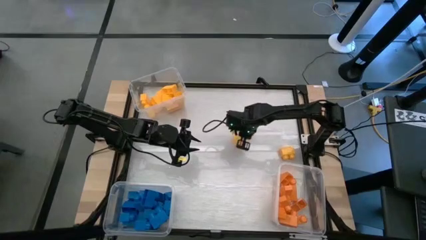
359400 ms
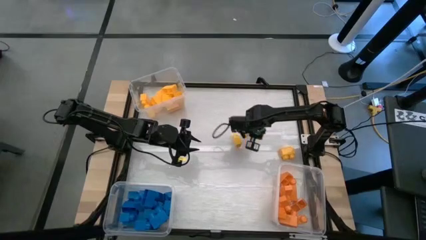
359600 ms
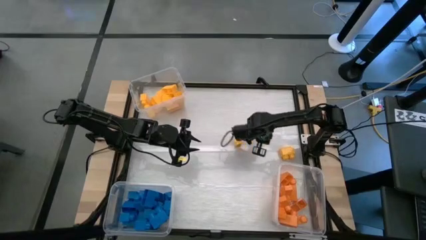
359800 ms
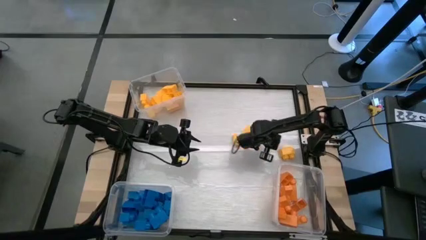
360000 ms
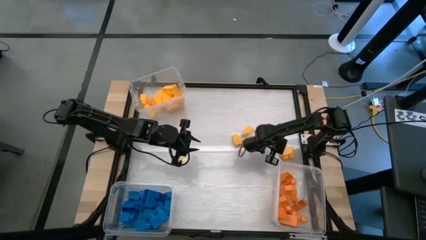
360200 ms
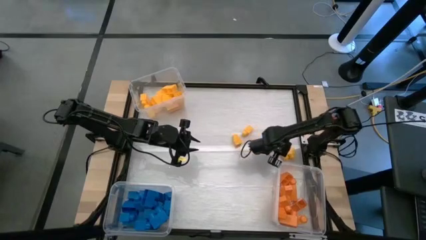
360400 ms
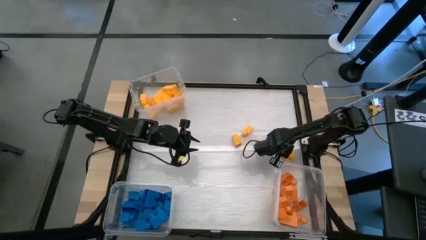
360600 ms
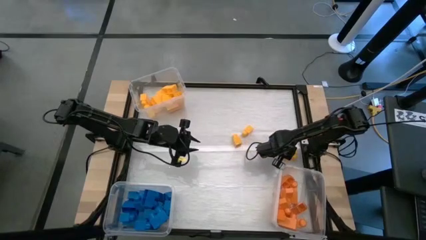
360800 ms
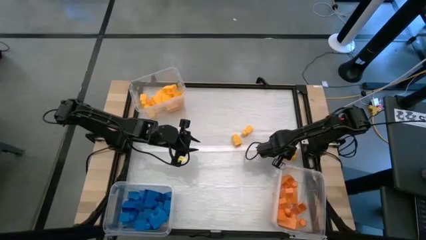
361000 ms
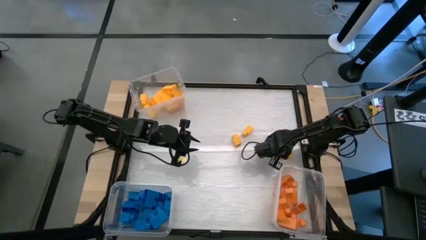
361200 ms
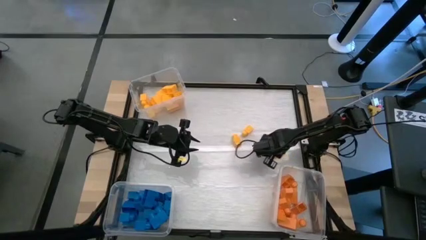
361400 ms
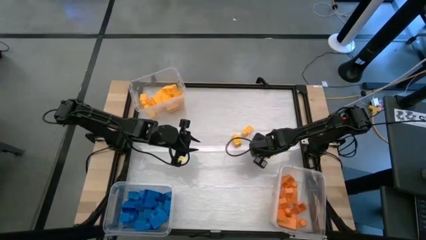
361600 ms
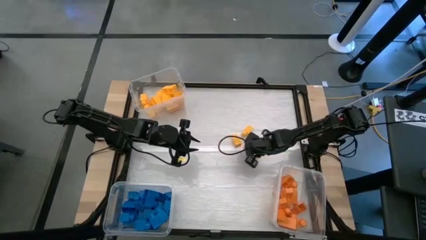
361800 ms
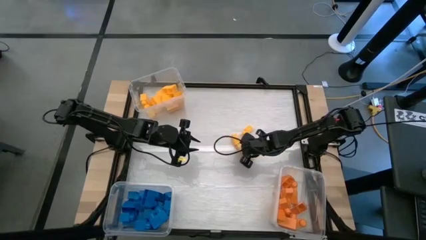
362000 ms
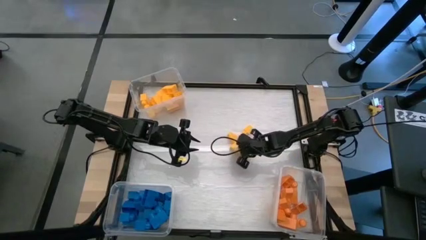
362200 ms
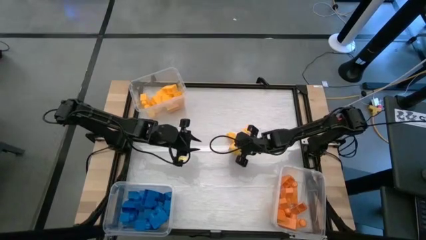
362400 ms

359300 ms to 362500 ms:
Task: Sort blocks
Move the yellow game piece to the left

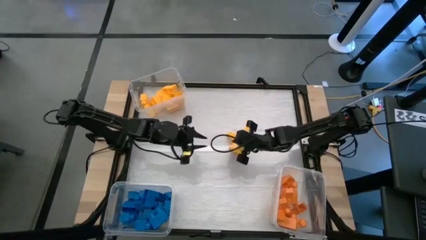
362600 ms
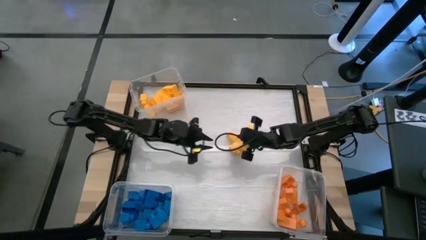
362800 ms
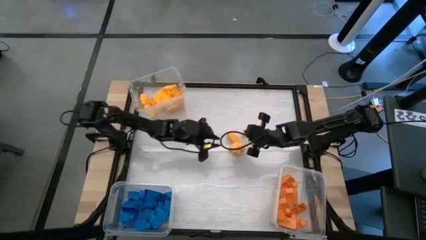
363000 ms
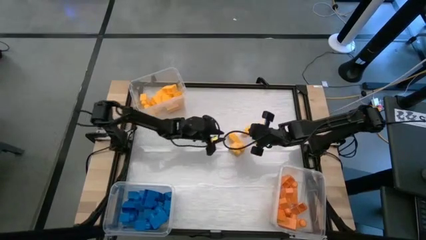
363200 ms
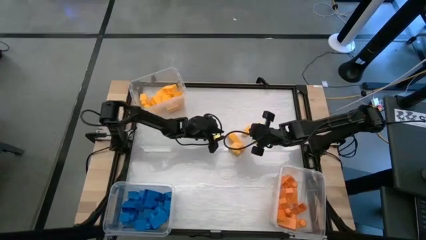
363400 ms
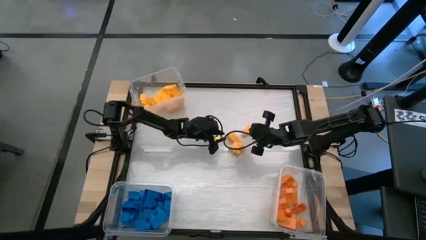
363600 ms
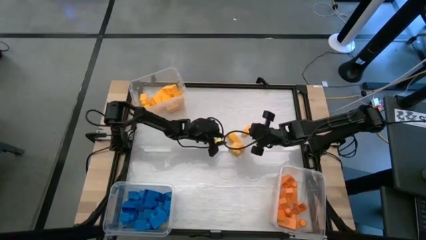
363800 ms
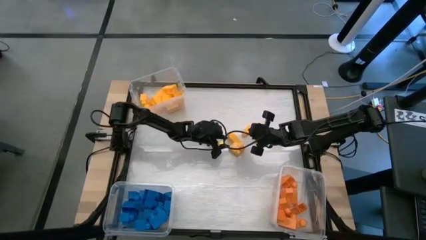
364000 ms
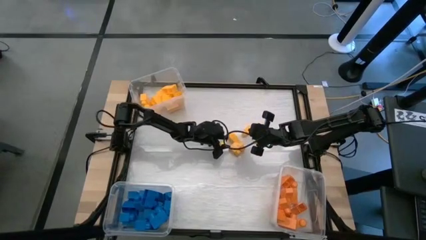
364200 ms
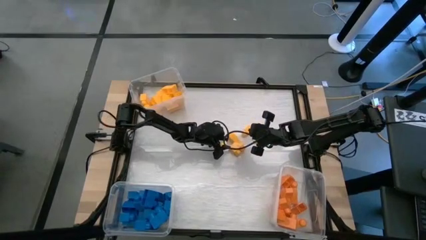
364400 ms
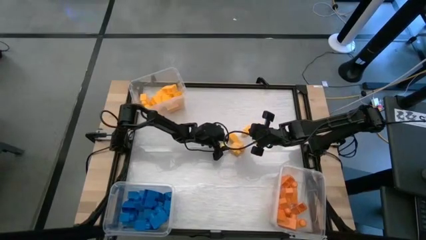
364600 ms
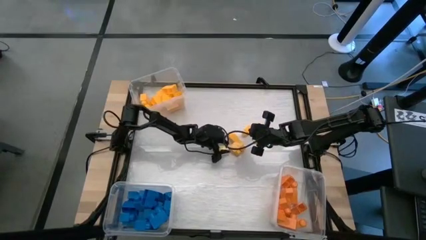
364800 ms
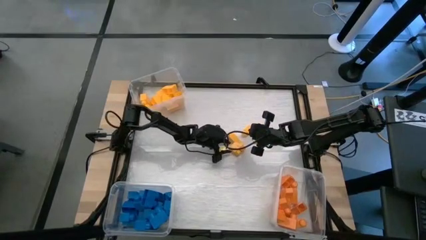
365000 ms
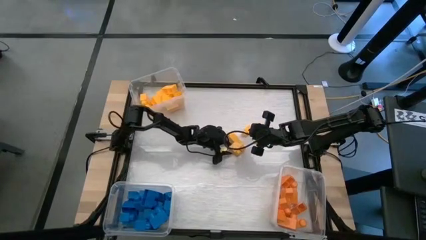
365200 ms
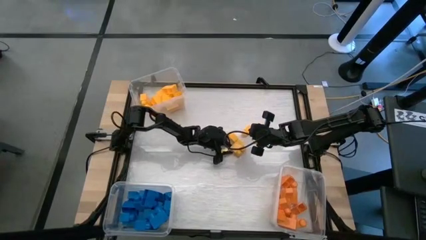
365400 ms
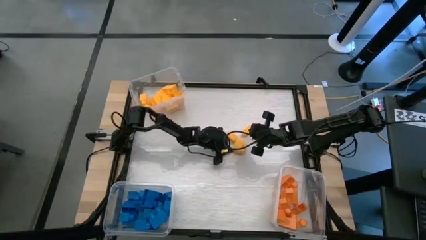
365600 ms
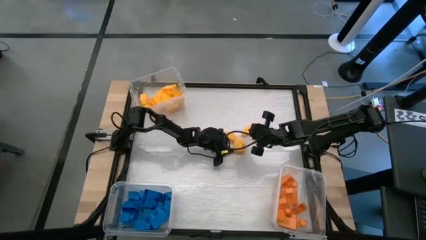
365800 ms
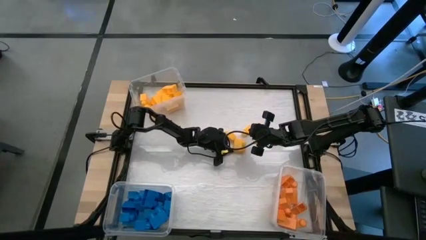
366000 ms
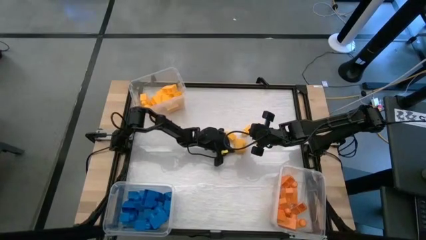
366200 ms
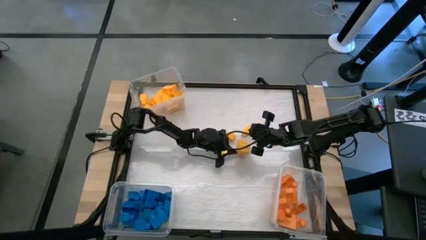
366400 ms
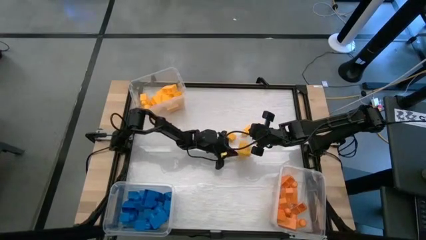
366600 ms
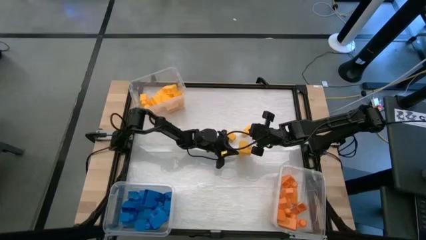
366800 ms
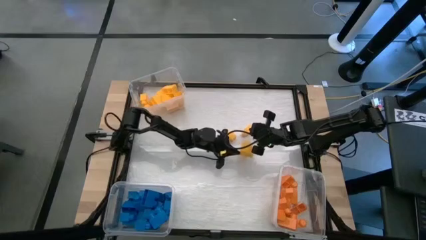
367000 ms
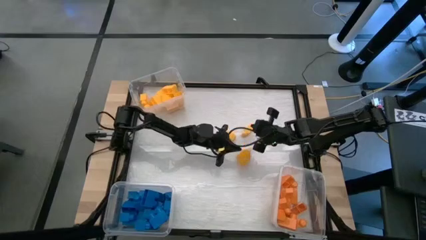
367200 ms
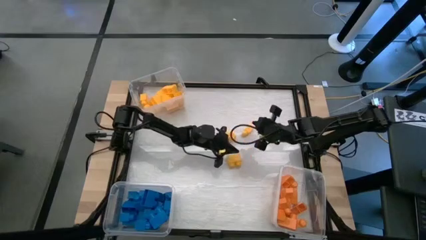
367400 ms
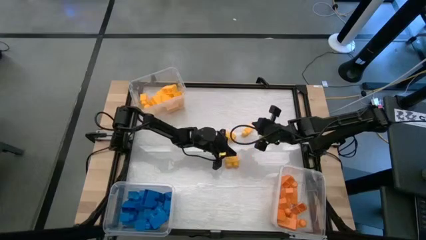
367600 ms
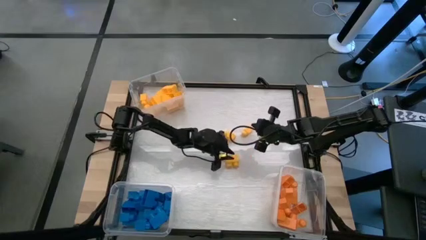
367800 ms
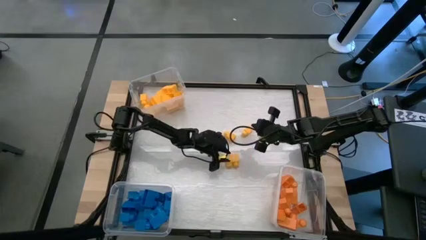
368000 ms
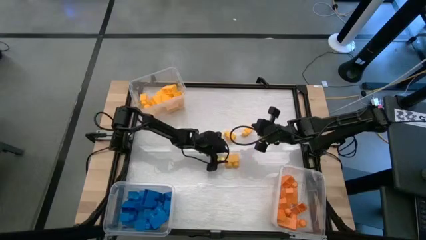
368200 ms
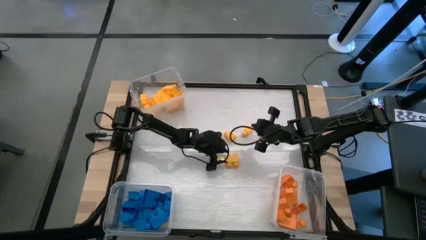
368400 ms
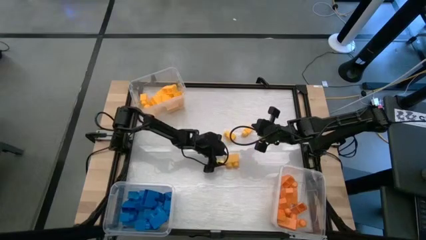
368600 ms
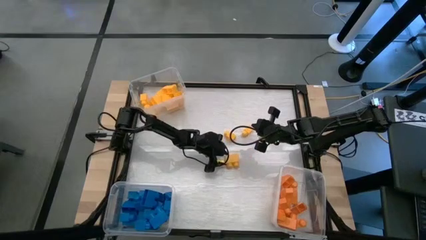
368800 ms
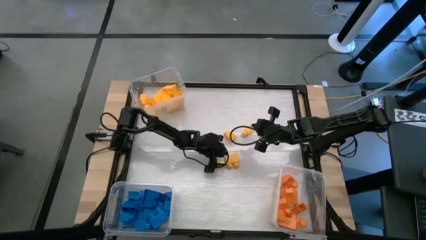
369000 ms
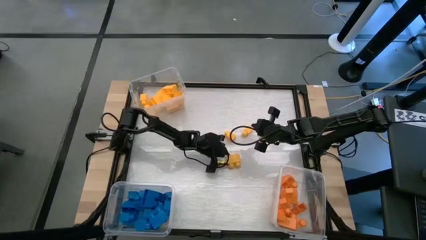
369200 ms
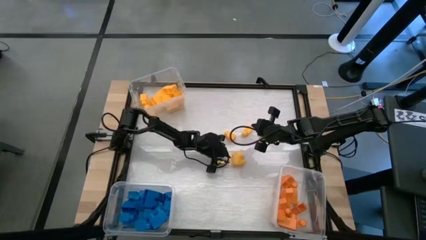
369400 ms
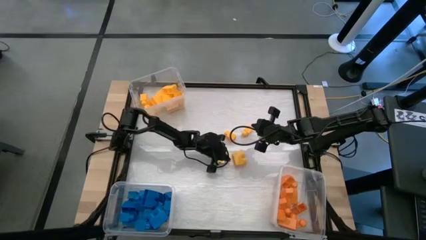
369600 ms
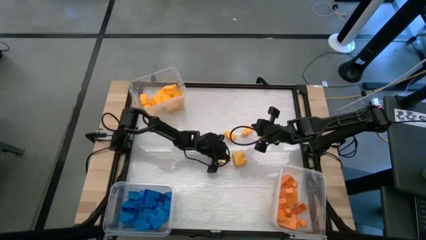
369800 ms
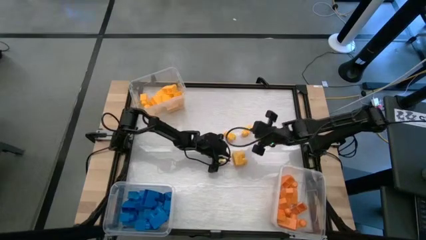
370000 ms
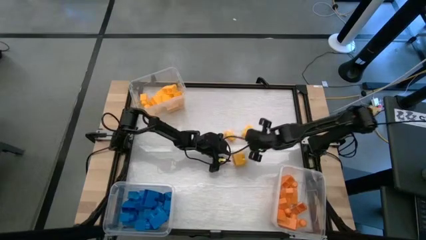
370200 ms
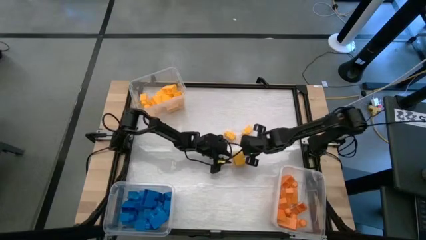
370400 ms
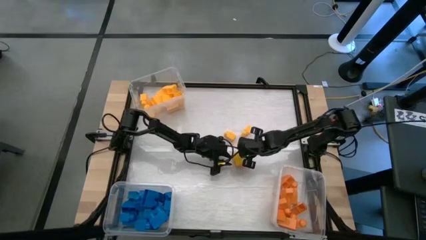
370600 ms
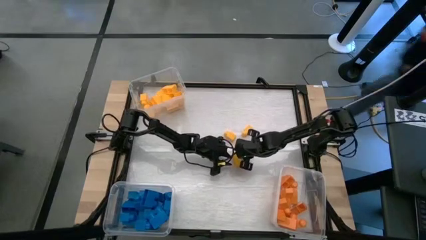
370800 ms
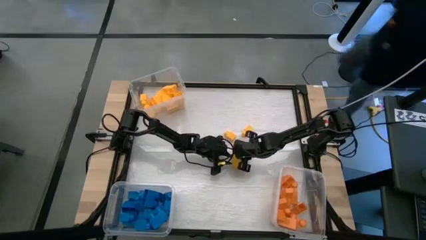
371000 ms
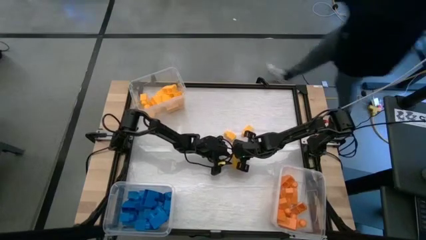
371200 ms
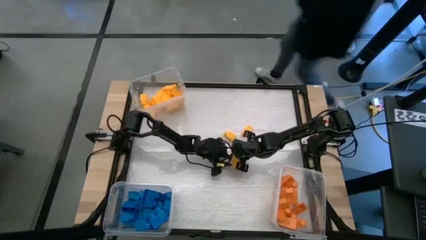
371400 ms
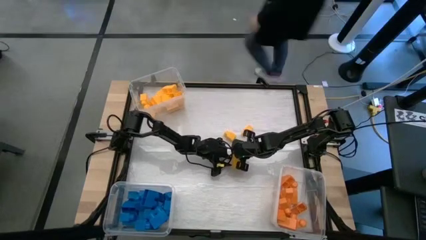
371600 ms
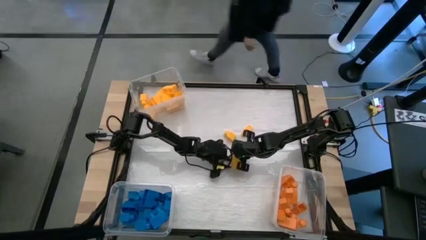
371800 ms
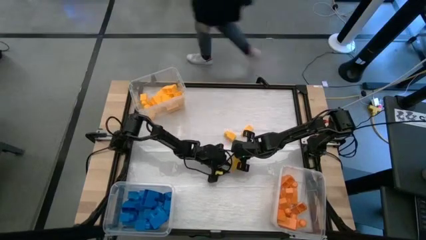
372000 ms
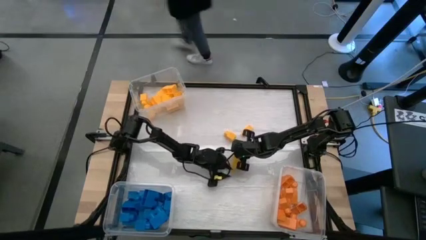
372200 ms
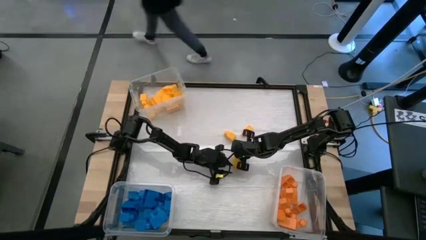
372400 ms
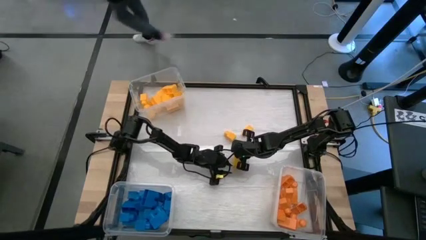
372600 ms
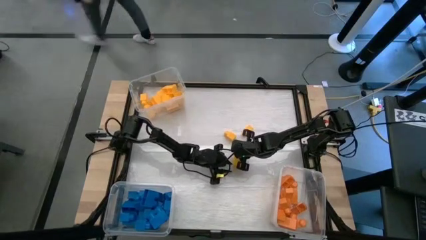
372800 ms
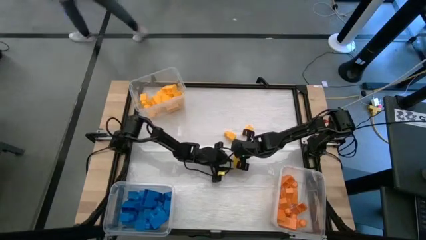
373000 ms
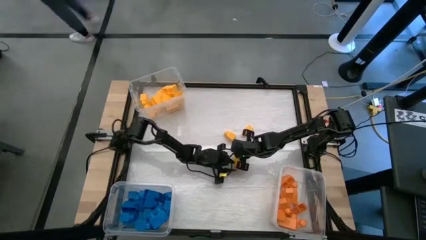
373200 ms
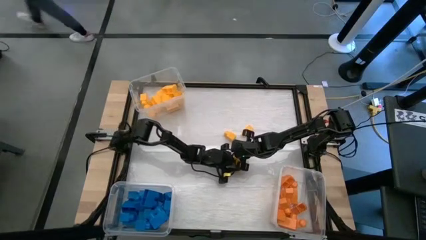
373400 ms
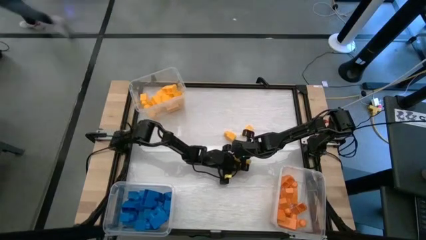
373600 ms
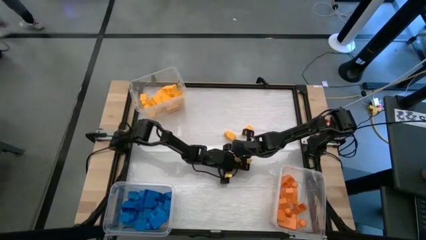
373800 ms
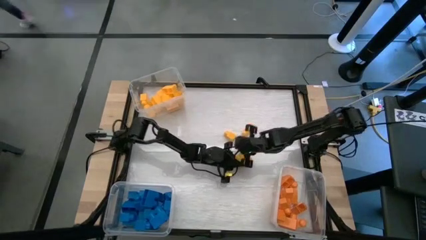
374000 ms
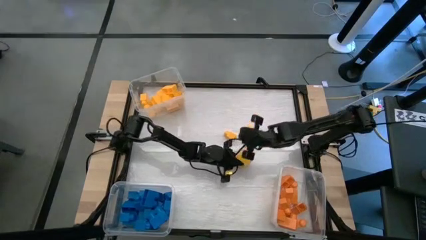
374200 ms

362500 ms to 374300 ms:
Put the yellow game piece into the top transparent bin
